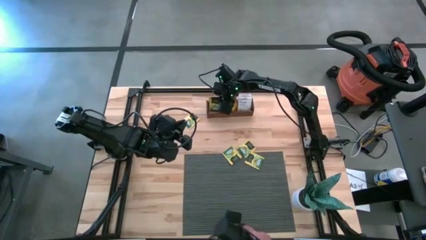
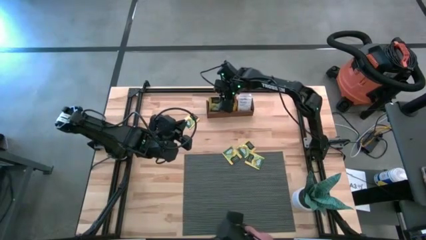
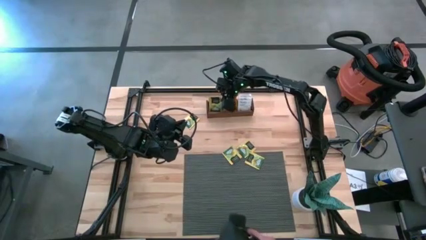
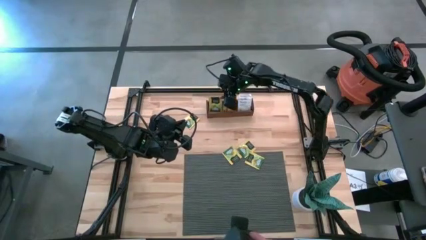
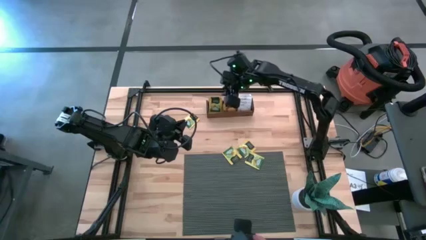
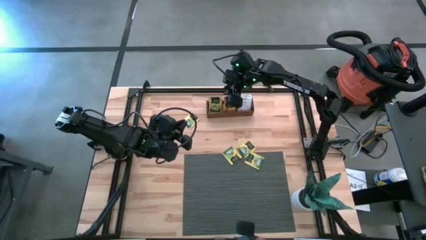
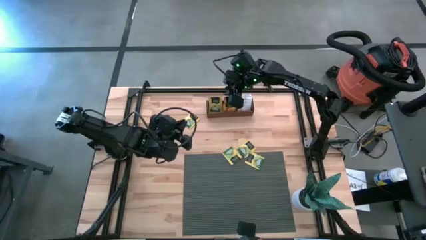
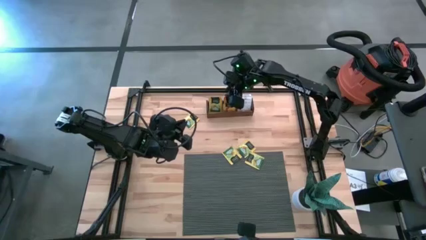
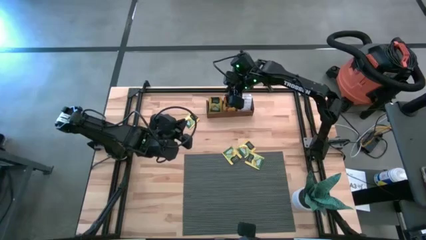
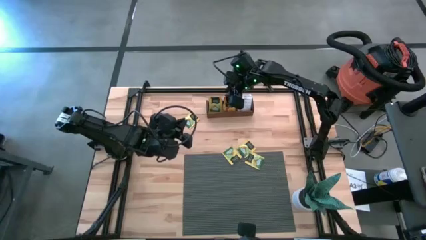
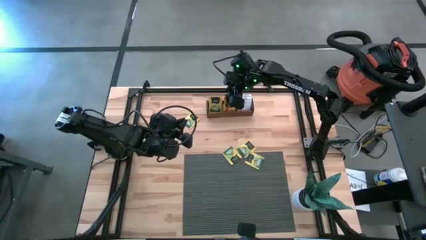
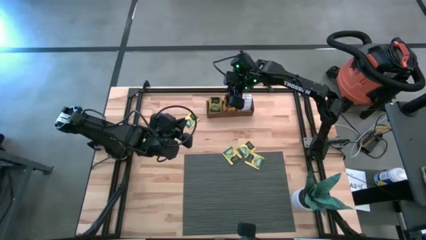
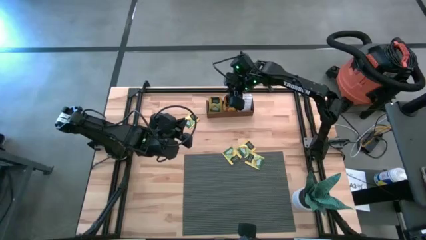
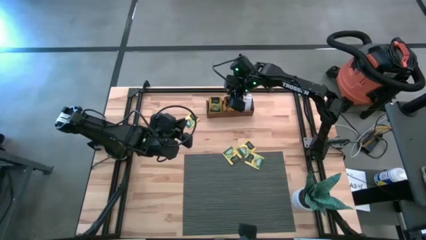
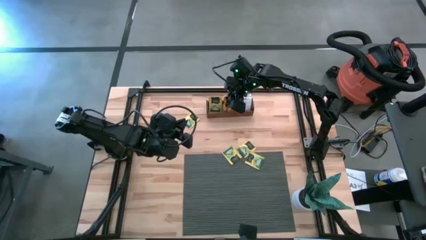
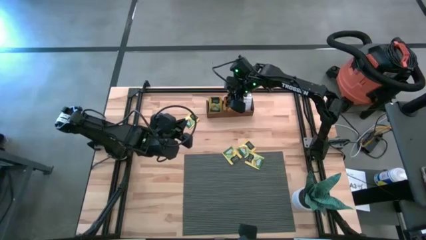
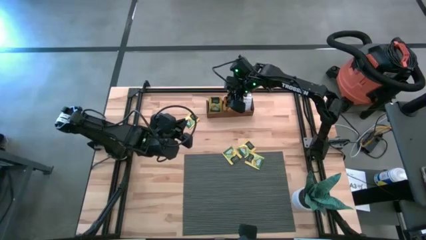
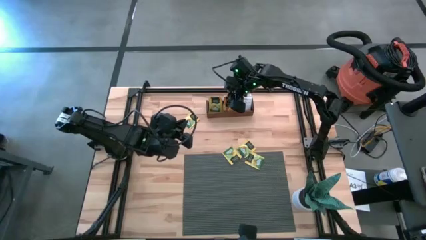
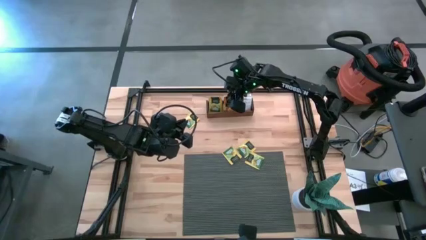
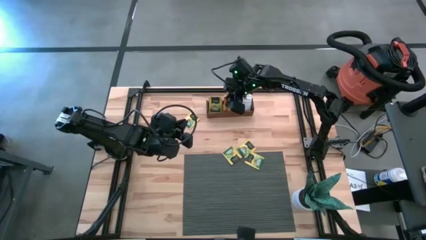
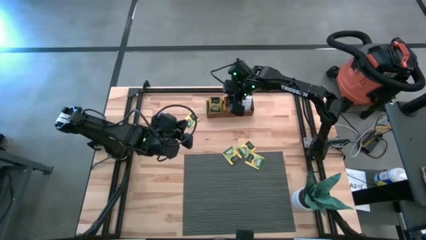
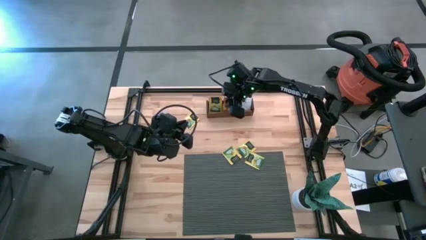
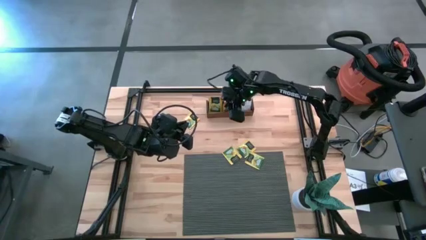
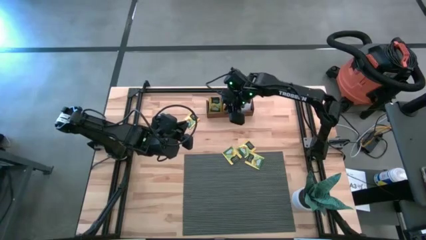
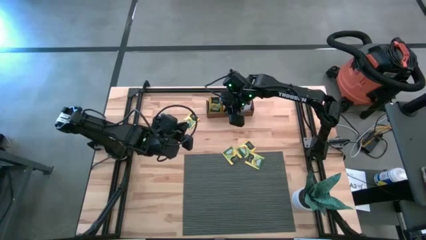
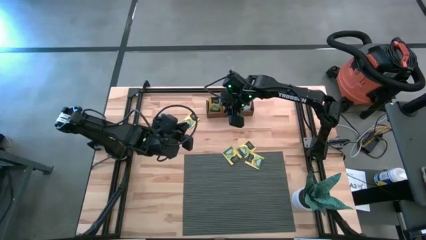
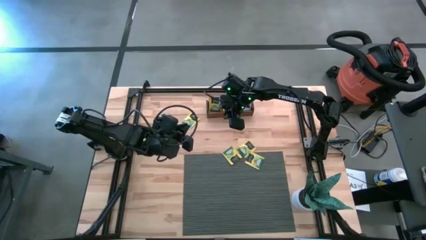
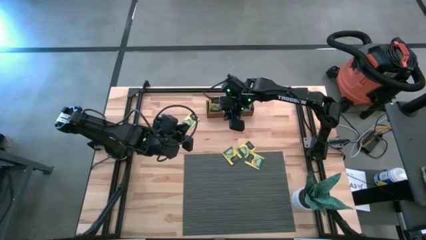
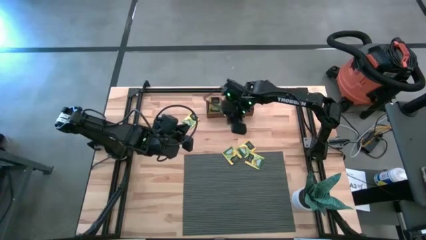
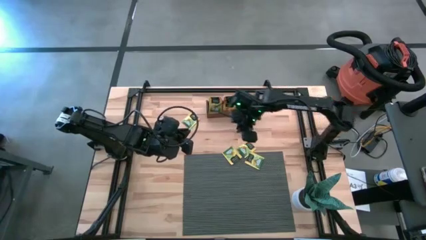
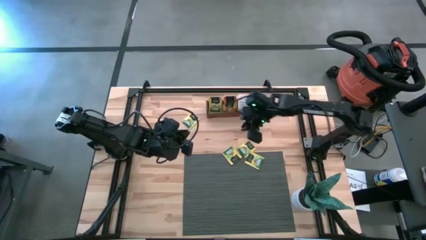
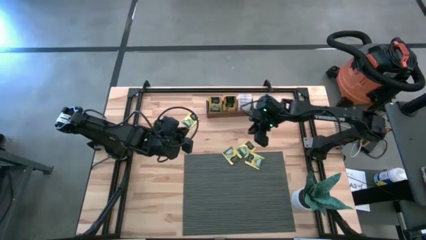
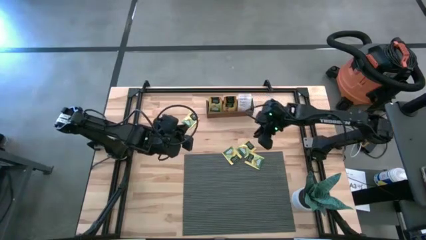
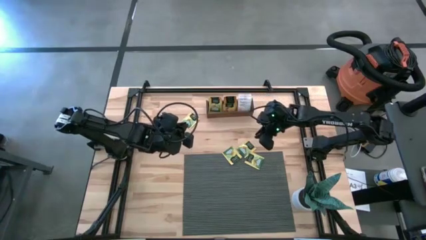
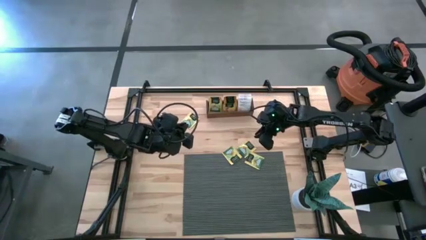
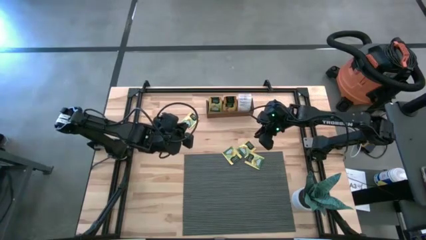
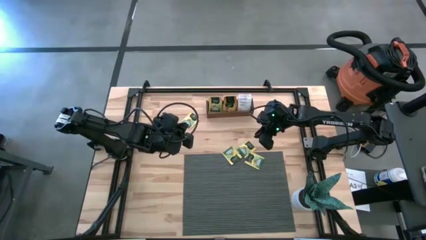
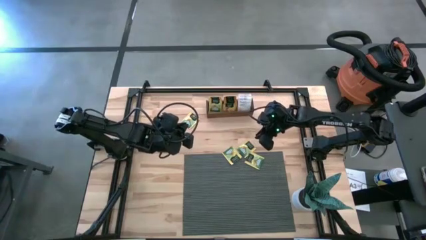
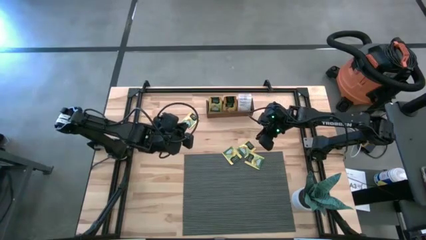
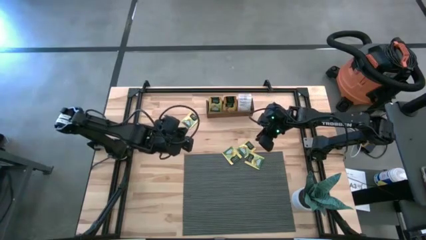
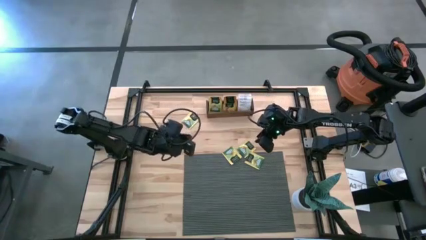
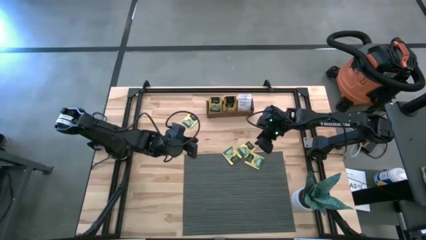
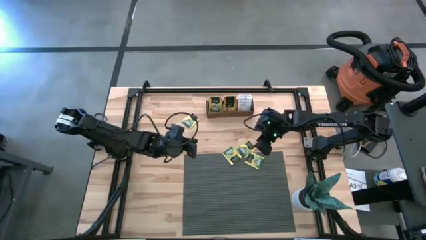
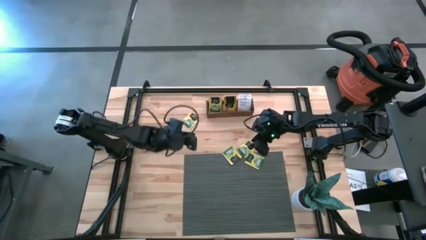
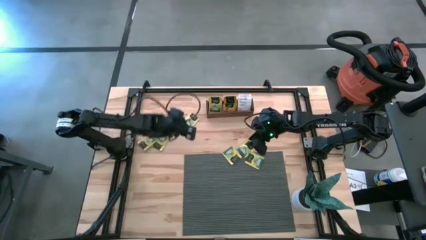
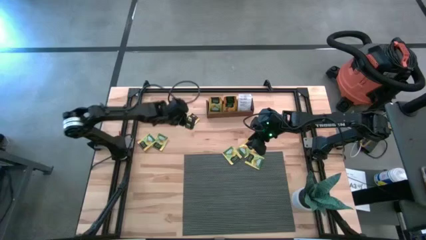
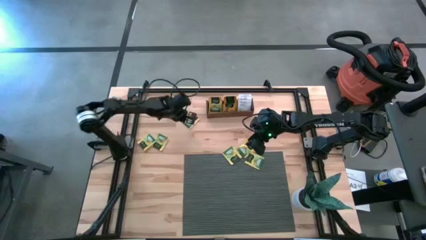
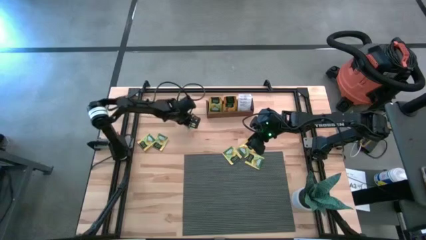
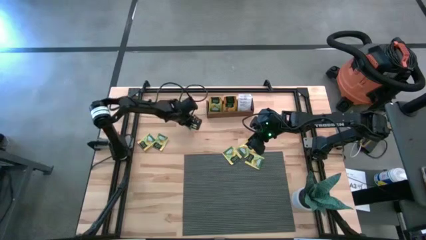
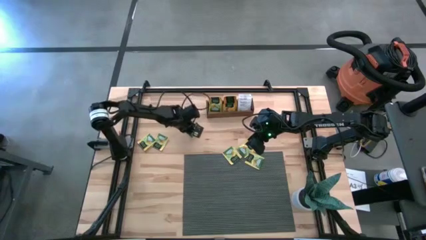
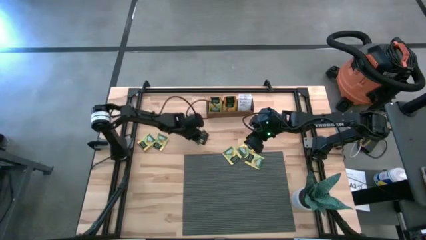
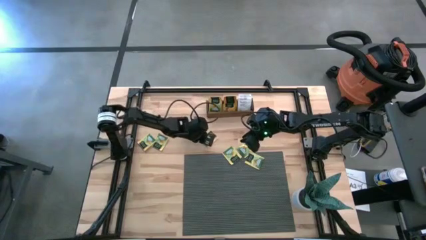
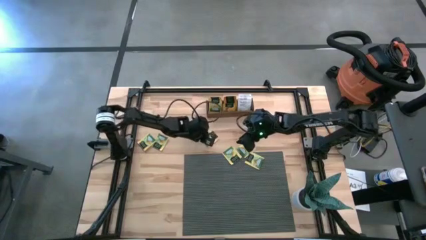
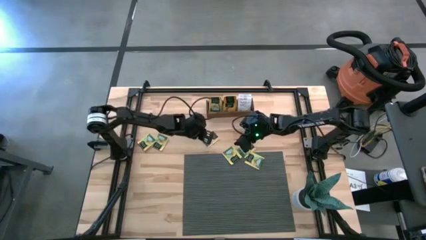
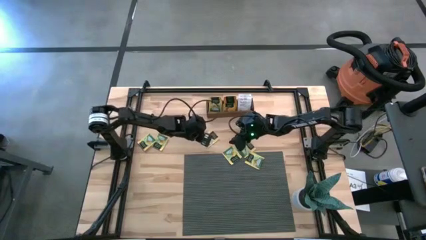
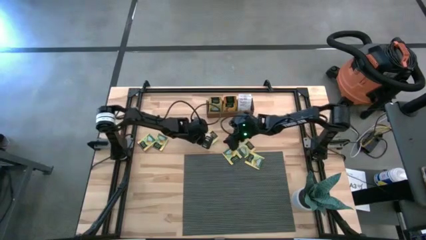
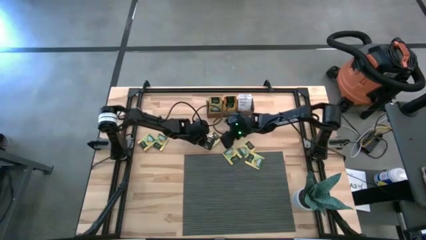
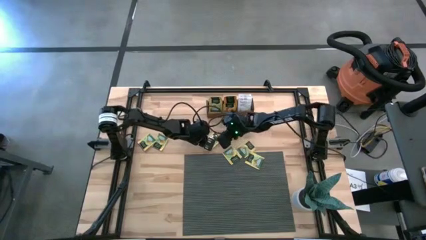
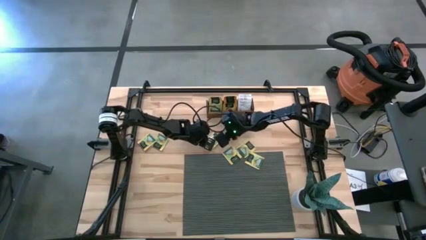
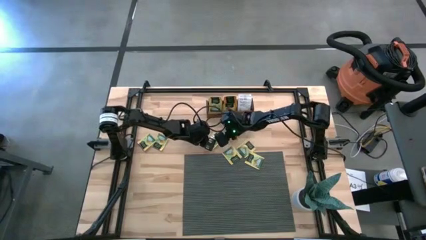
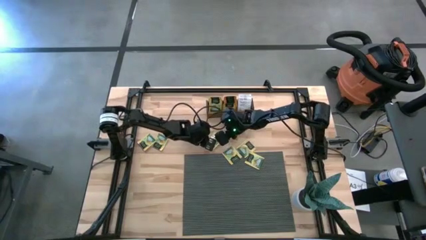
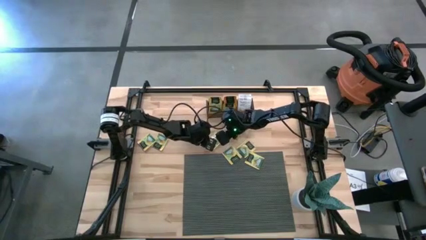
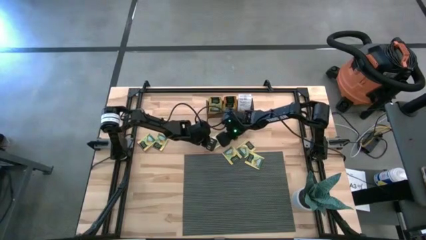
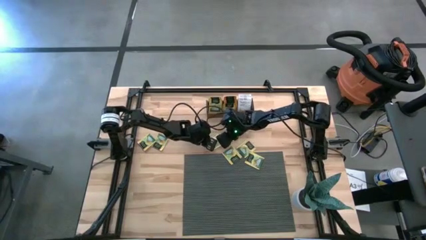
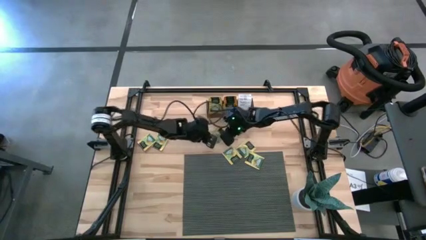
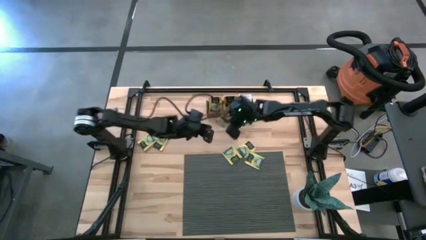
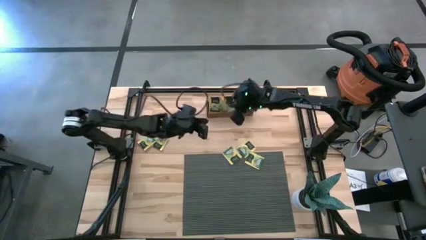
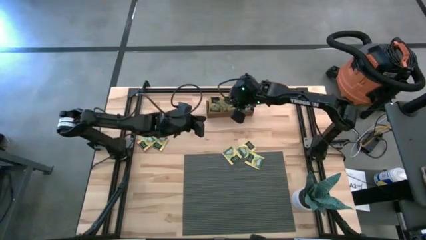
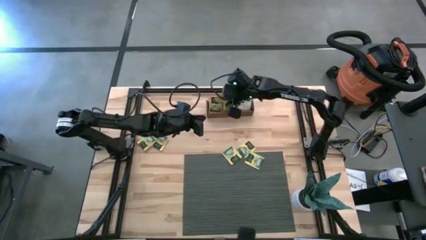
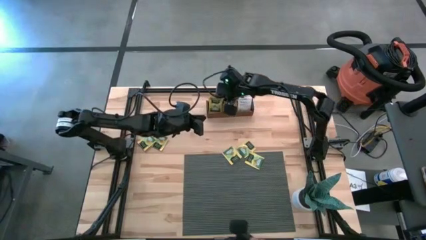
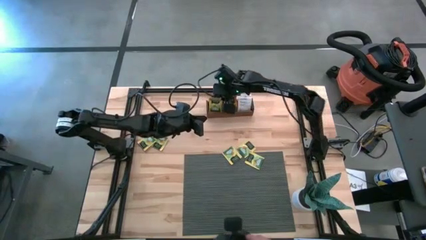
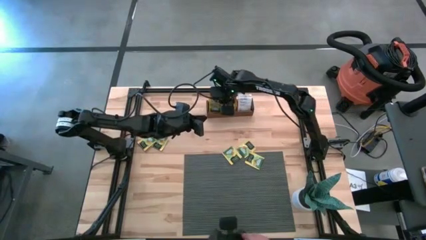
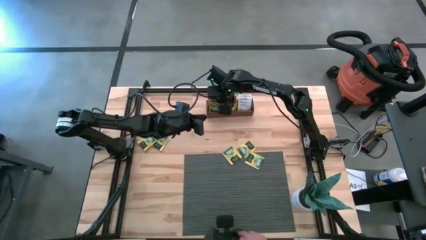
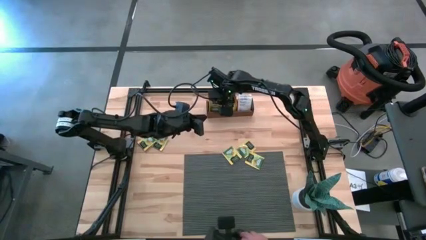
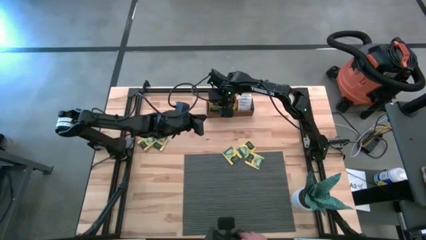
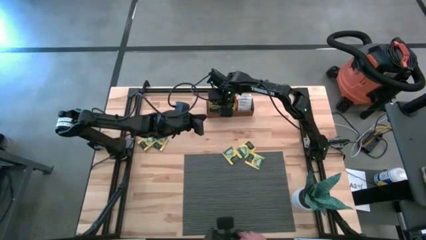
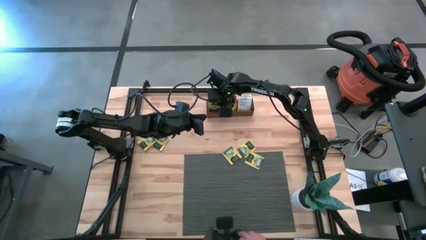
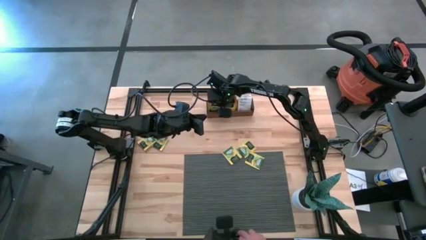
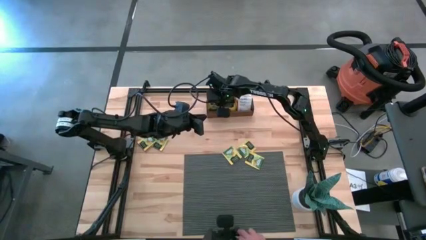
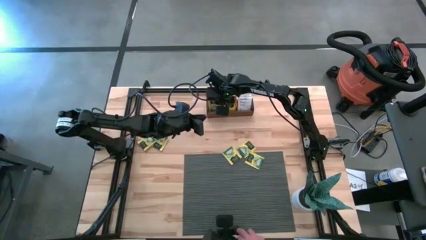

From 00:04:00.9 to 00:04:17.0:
Task: Pick & Place Tea
Put the yellow tea bag into the left section of the wooden organizer

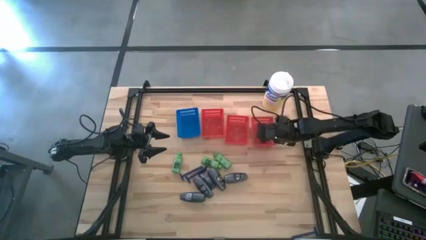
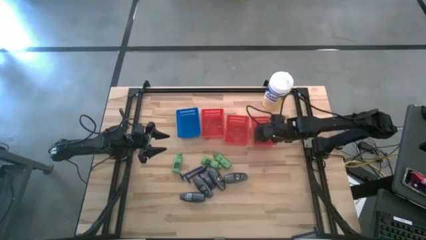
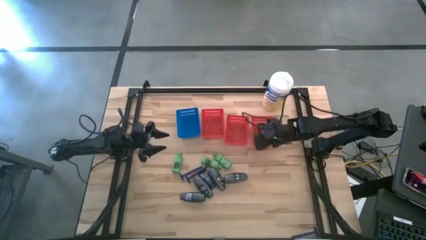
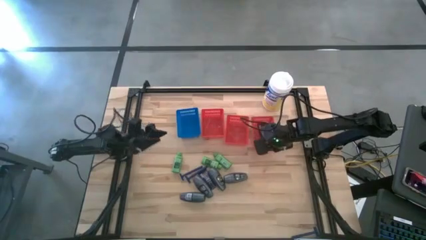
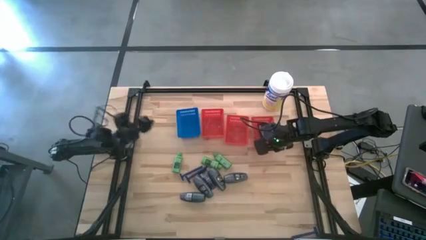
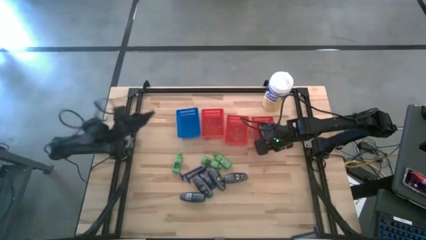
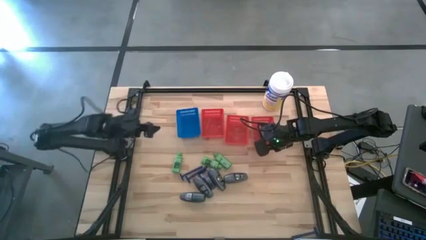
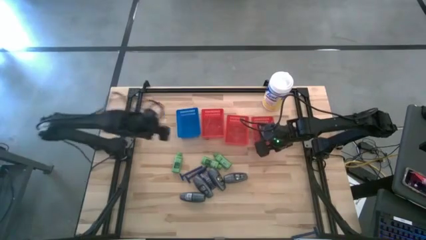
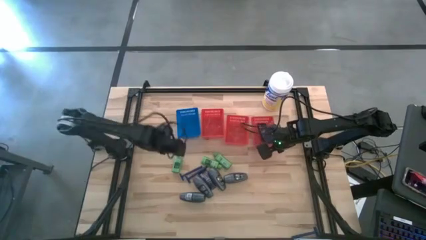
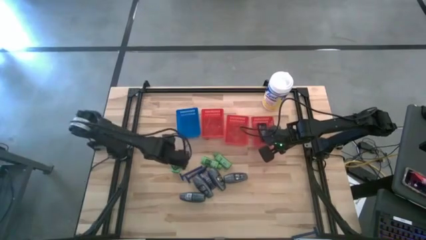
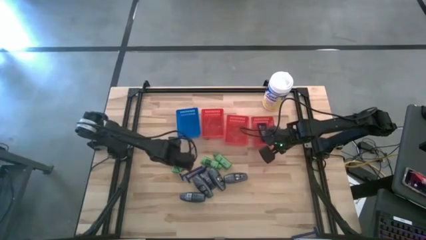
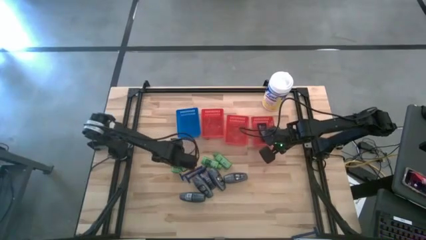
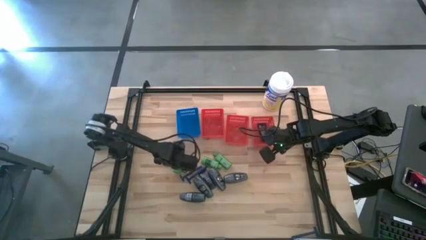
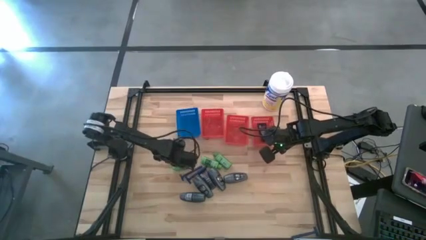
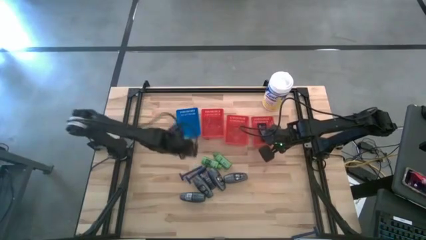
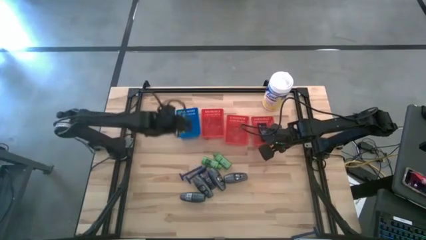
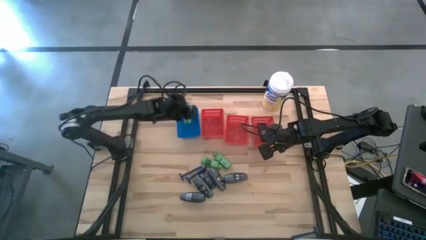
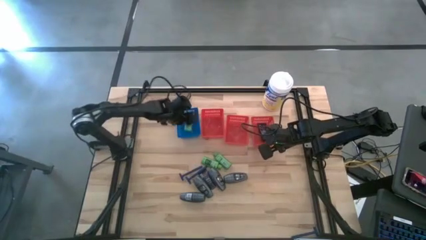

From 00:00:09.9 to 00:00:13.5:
Task: Pick & Place Travel size toiletries
Put the green shampoo into the blue bin
